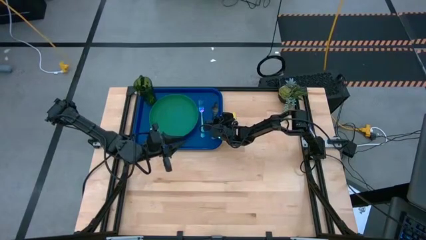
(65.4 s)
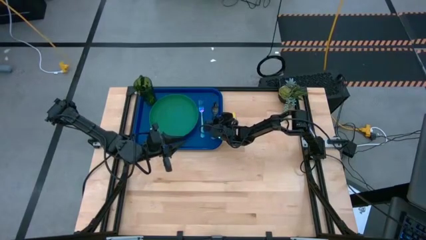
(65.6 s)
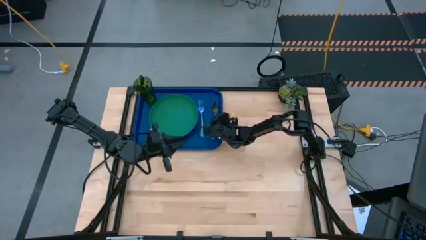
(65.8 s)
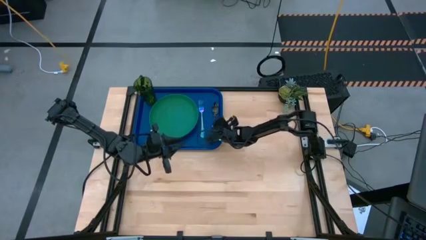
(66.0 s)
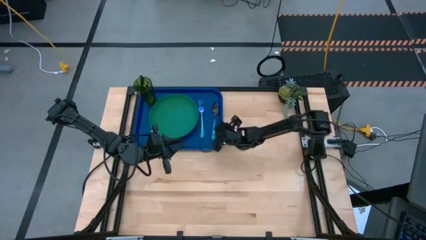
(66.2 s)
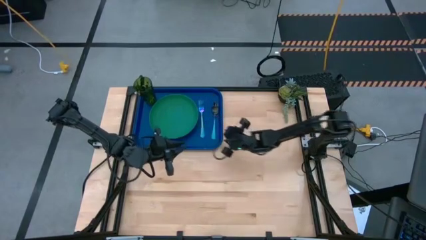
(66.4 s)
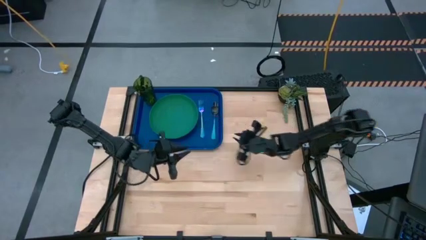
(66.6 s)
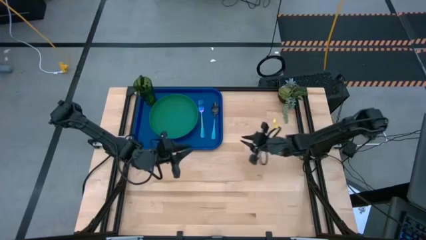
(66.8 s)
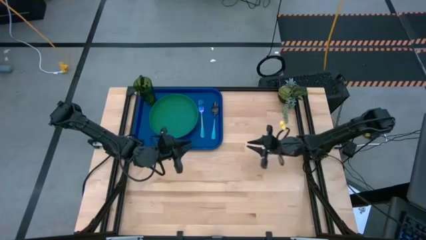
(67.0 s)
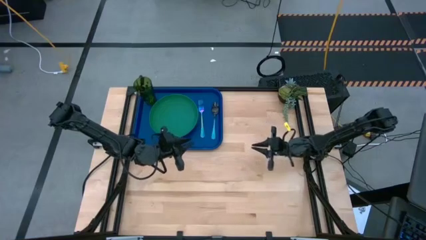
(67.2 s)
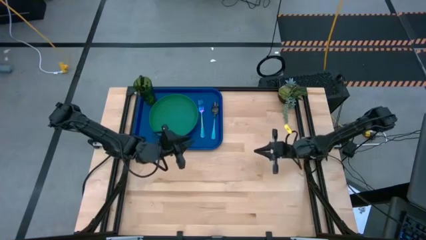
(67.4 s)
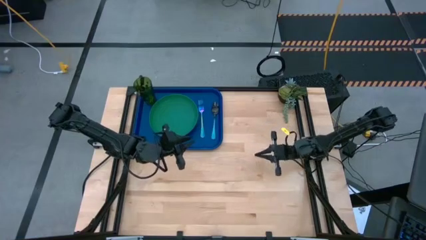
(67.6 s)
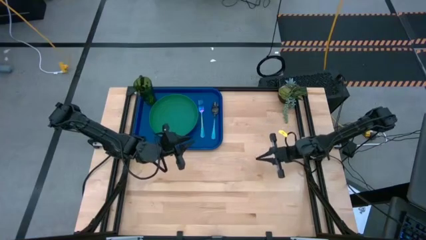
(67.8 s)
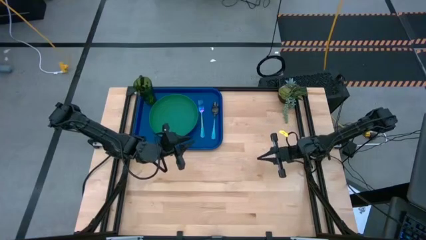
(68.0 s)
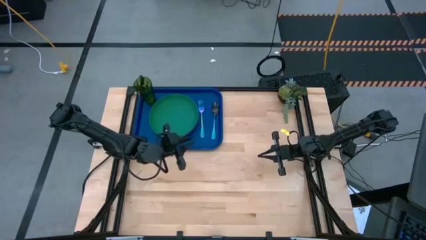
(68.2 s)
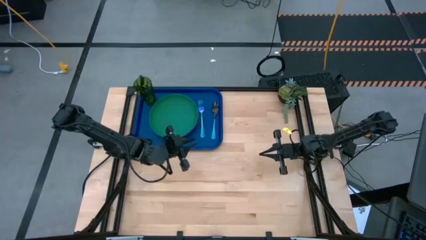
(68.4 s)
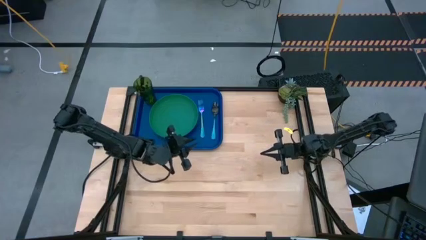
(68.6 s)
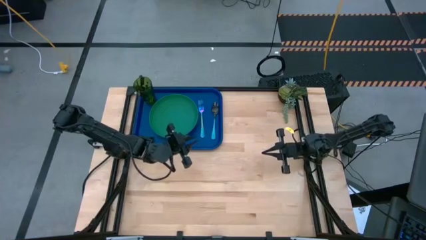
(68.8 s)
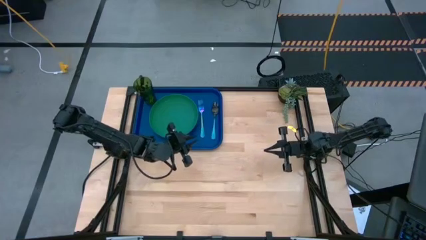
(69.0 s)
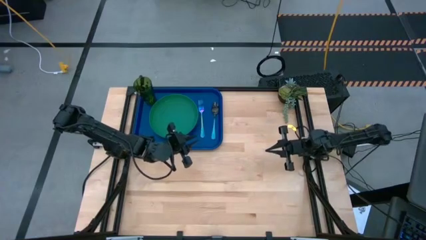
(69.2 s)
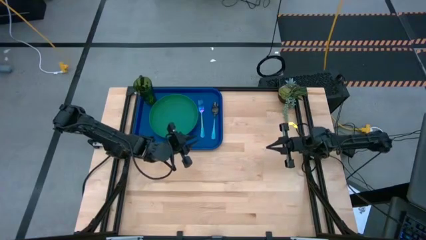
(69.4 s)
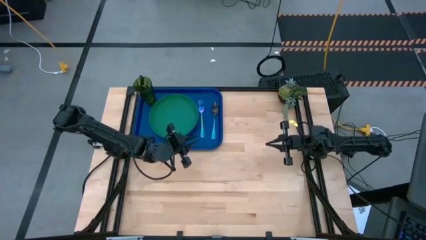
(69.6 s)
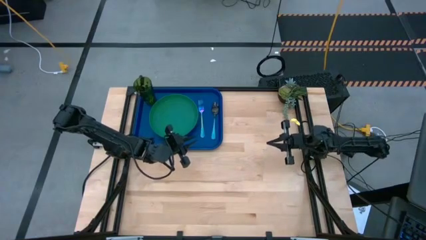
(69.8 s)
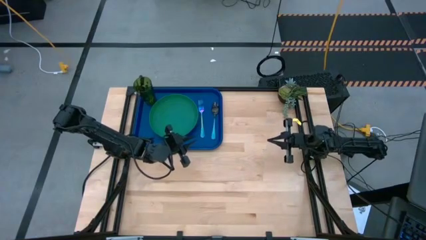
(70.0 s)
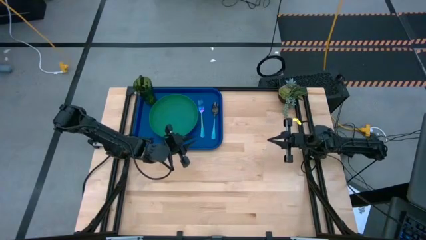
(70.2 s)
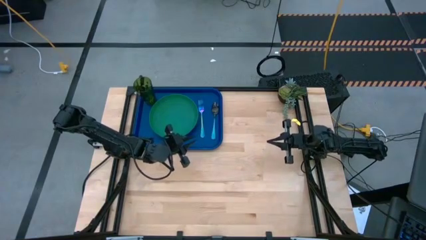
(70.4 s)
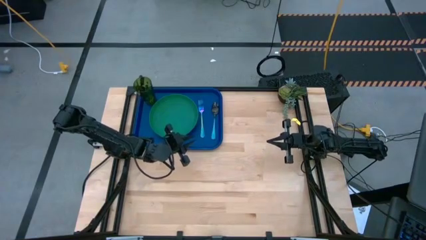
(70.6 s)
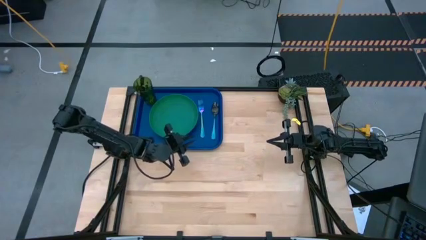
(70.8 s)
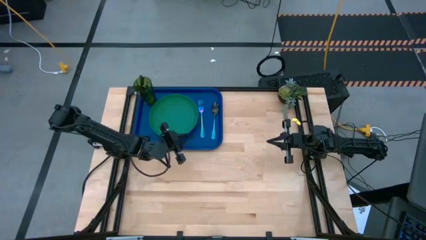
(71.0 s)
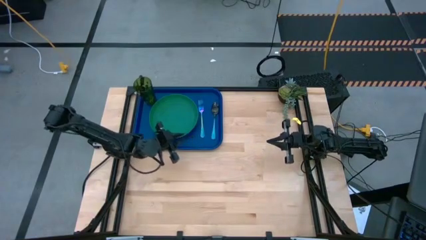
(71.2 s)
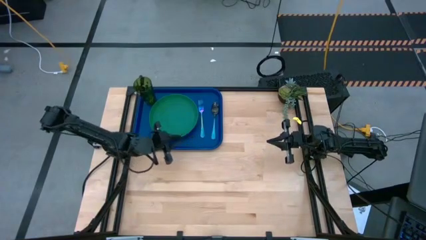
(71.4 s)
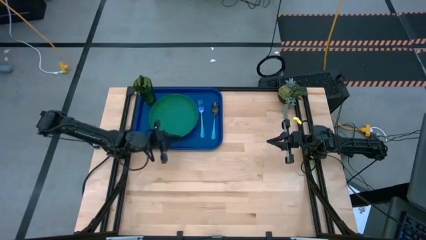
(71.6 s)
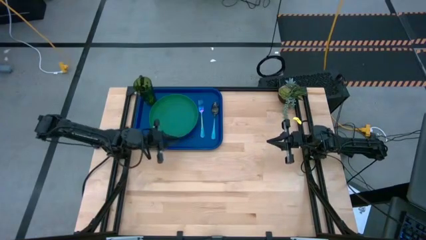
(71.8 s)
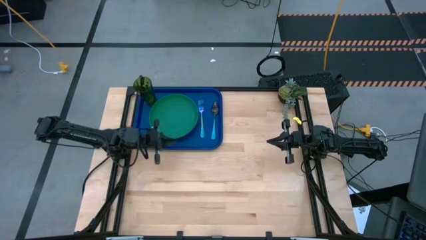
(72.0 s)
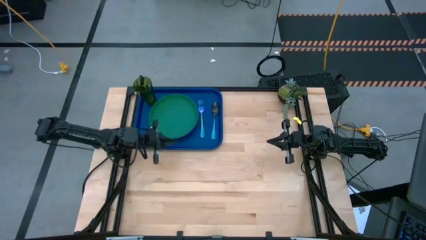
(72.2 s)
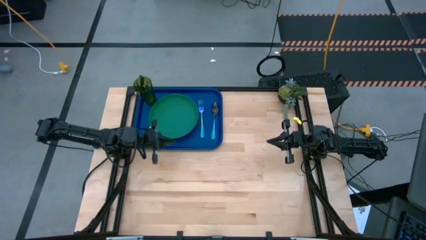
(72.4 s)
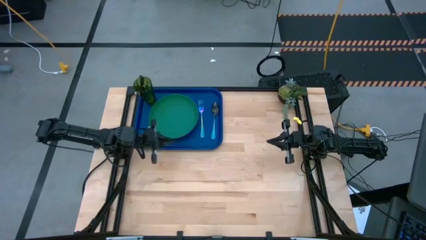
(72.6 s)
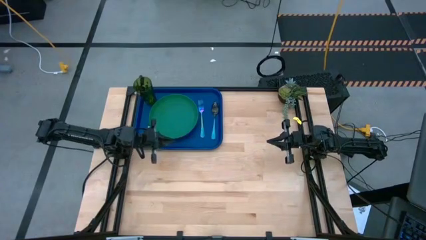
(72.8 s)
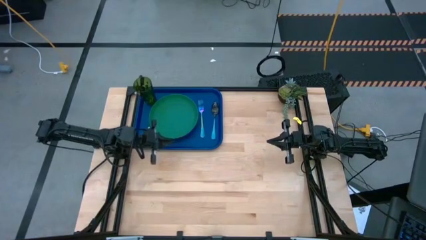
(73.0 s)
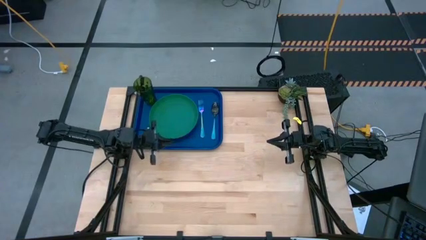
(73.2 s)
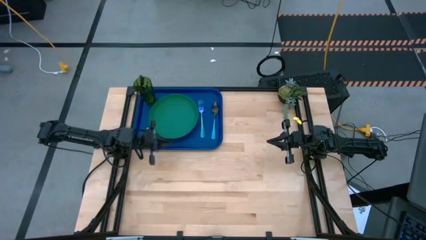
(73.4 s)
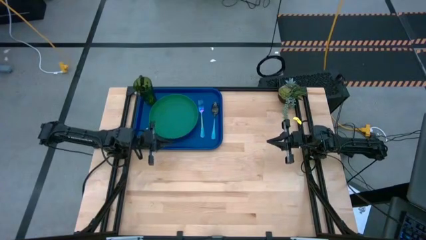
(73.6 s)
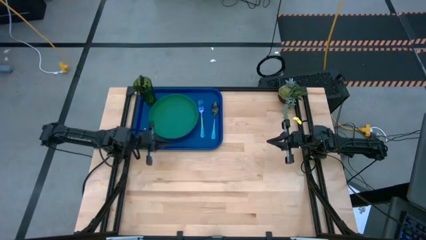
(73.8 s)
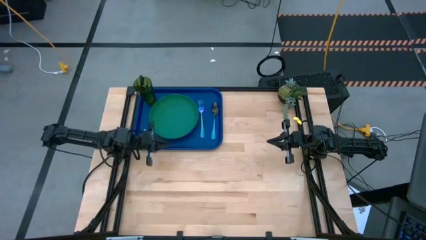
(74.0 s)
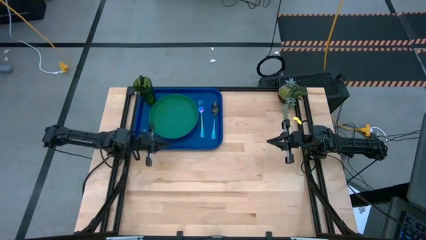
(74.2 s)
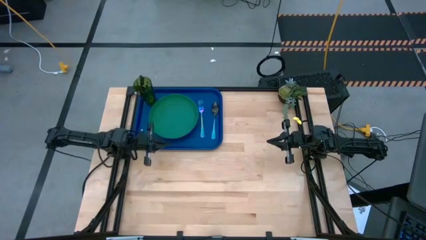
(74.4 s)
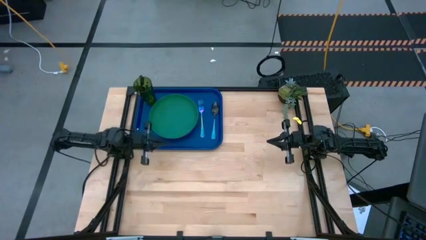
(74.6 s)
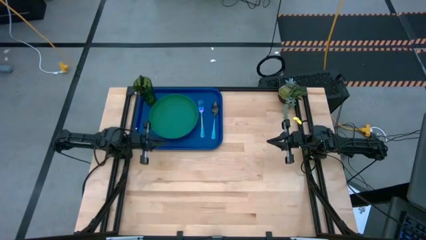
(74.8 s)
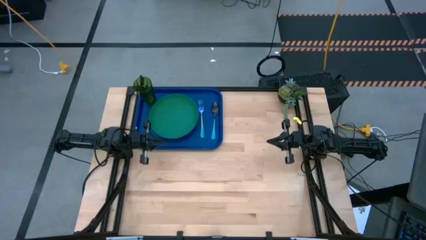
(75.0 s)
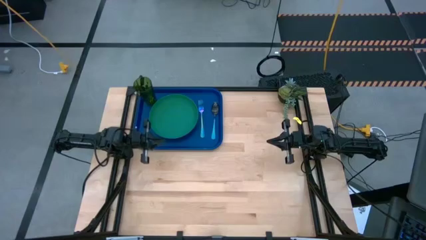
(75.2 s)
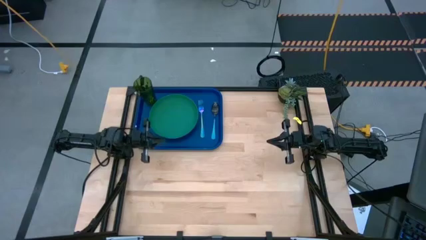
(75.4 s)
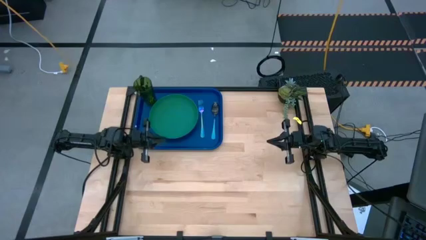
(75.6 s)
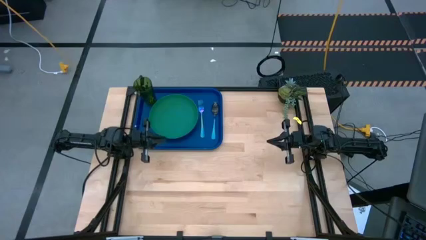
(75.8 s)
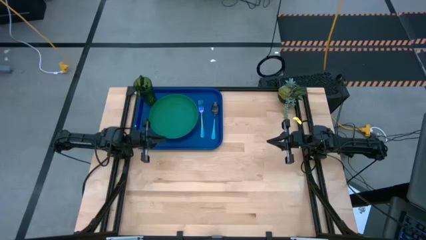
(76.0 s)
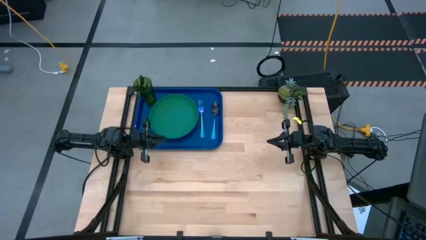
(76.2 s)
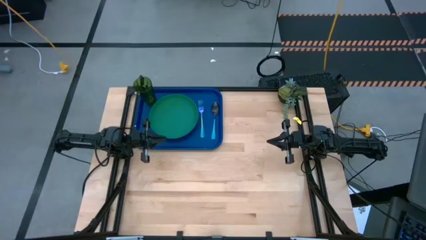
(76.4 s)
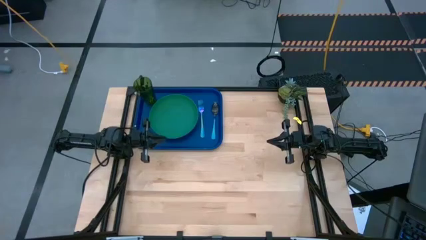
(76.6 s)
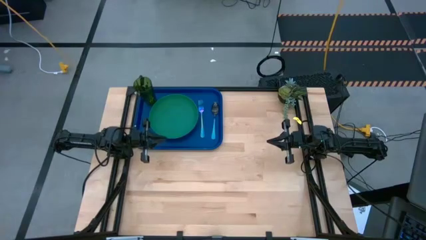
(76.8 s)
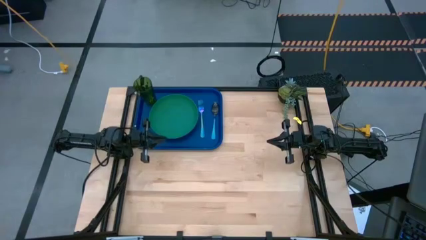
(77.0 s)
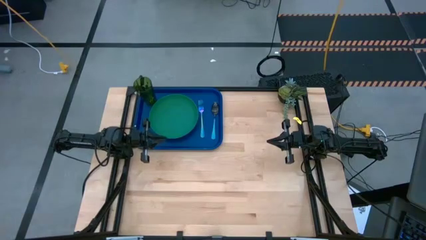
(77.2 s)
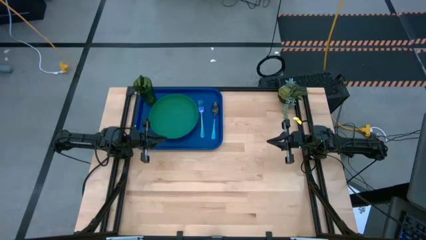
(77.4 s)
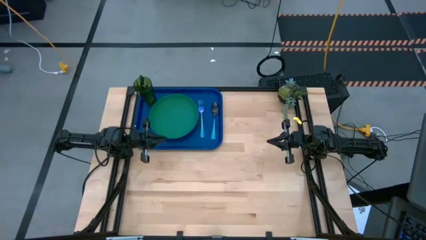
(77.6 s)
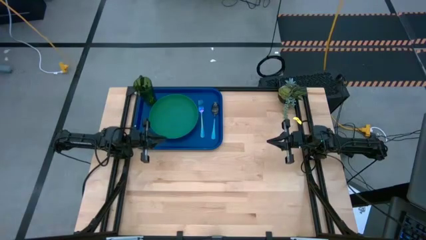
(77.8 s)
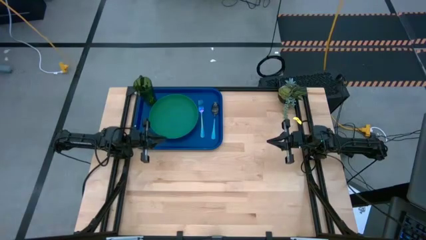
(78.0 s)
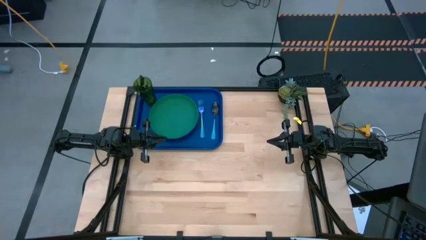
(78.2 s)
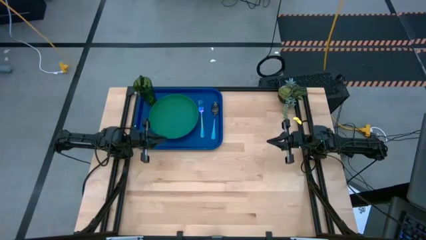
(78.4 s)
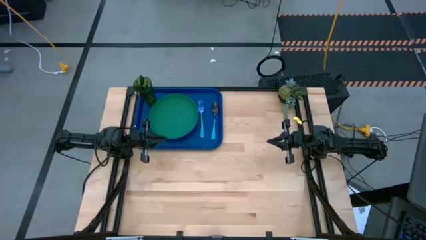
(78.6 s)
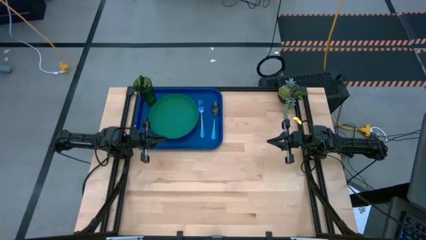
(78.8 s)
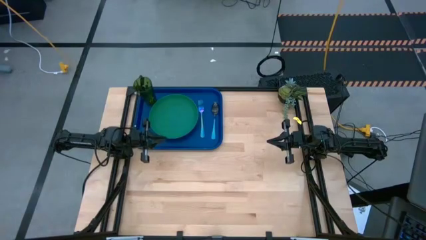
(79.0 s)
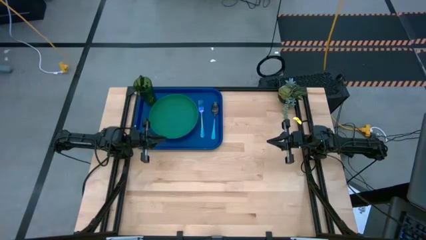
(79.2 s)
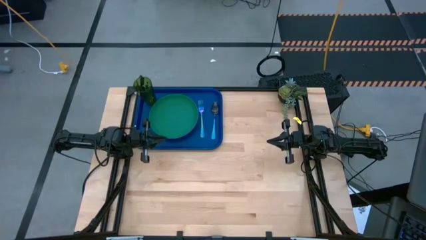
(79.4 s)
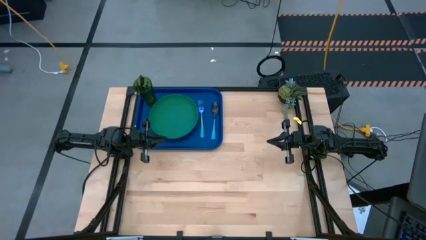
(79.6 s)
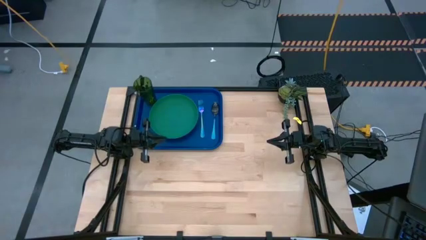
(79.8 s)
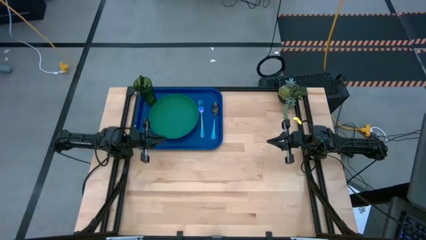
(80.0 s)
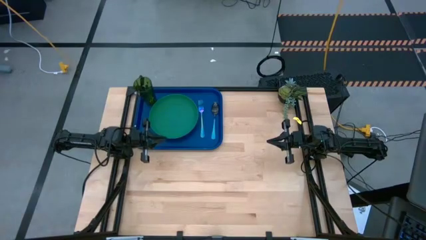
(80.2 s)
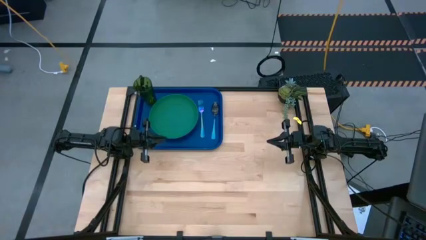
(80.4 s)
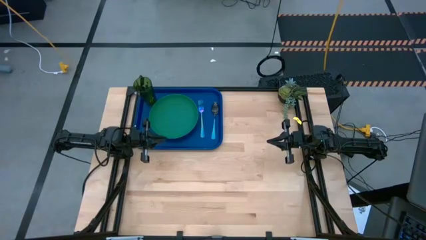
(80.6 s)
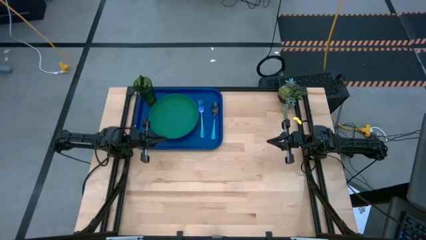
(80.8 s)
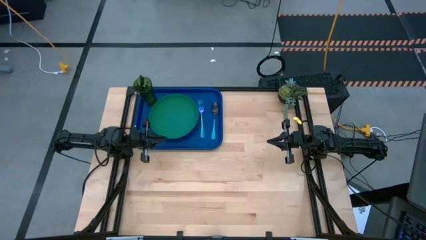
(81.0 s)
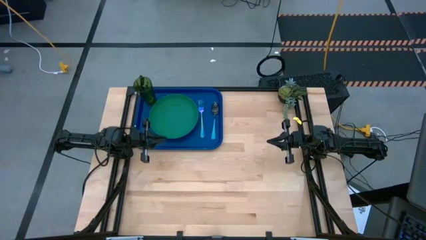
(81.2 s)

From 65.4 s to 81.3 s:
Task: Pick and place plate/cup/fork/spoon on tray
Return to Home Position
